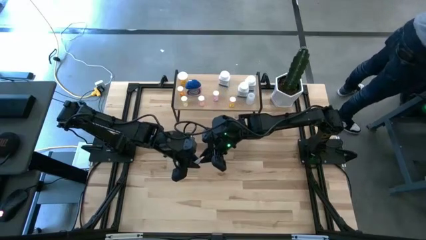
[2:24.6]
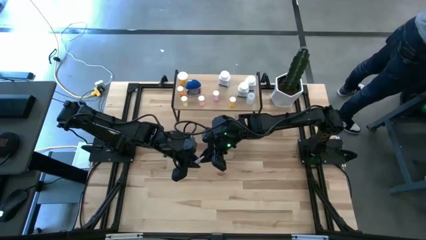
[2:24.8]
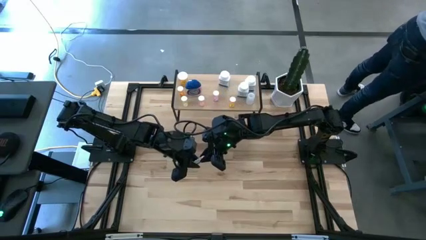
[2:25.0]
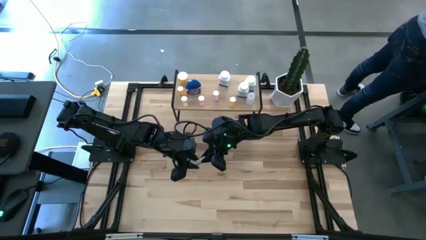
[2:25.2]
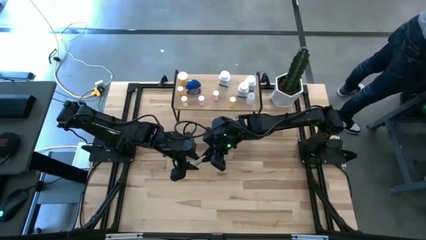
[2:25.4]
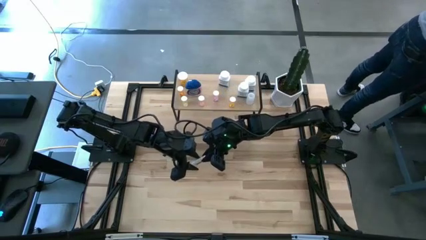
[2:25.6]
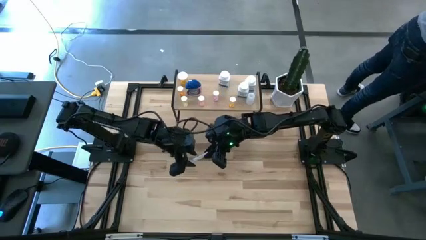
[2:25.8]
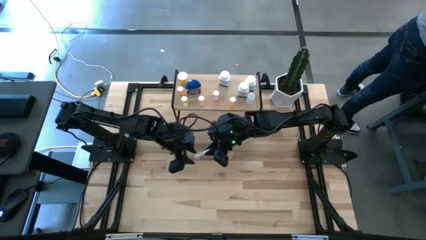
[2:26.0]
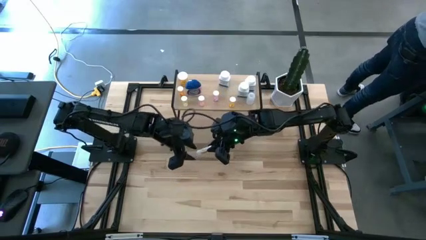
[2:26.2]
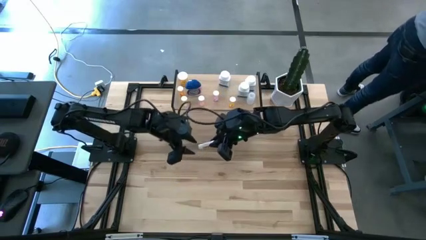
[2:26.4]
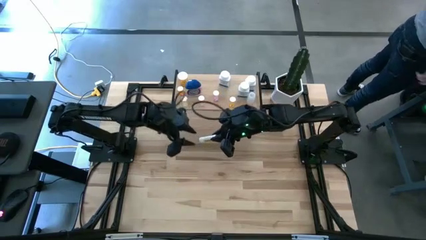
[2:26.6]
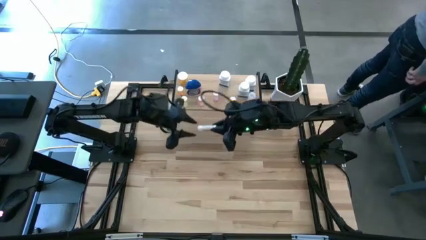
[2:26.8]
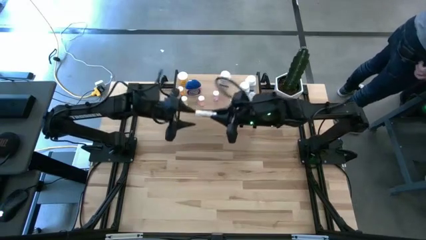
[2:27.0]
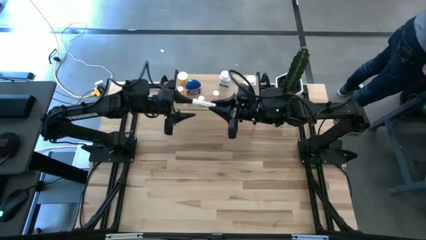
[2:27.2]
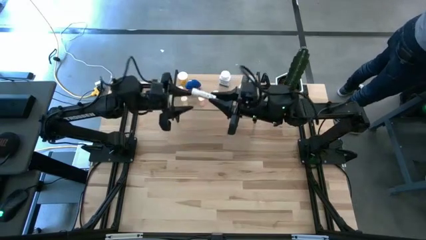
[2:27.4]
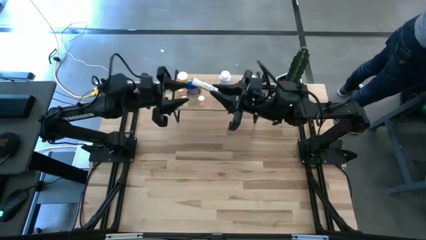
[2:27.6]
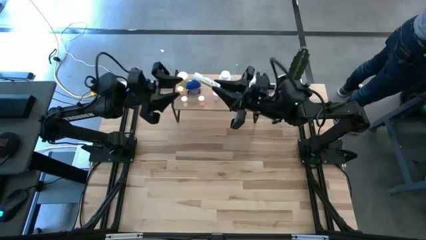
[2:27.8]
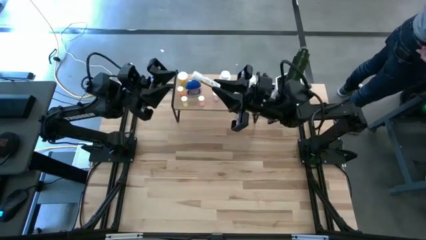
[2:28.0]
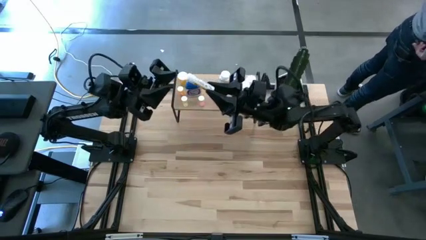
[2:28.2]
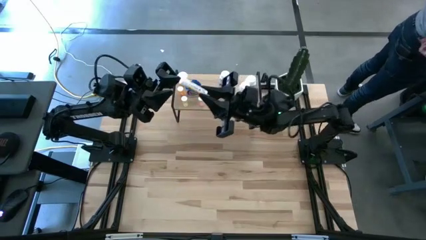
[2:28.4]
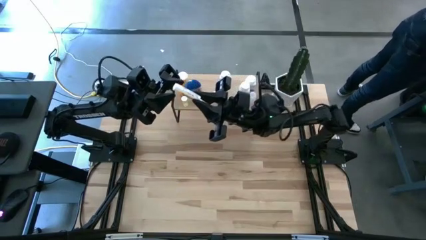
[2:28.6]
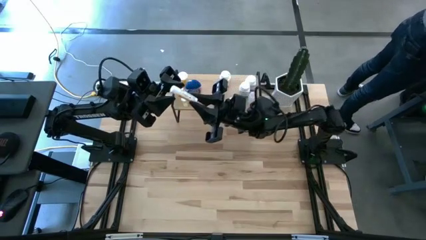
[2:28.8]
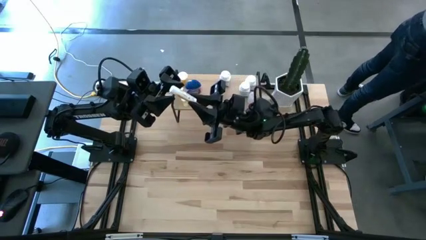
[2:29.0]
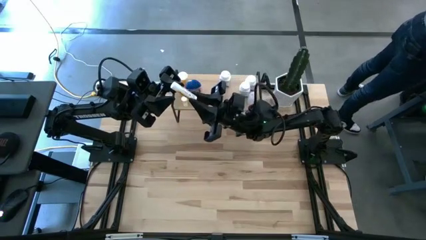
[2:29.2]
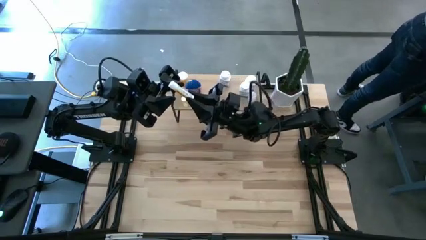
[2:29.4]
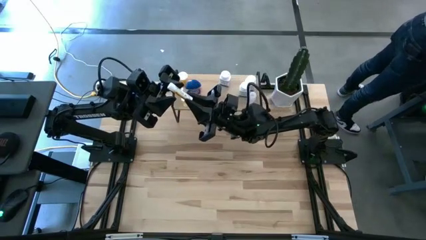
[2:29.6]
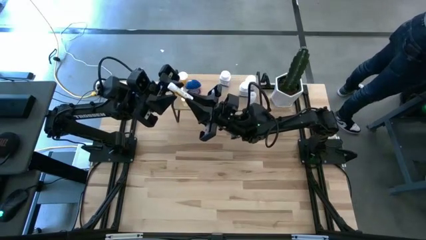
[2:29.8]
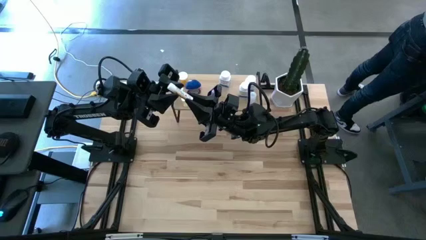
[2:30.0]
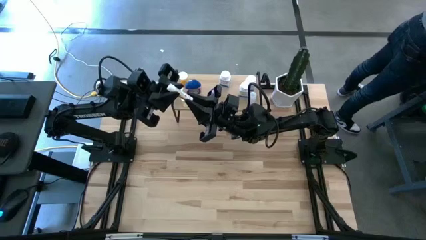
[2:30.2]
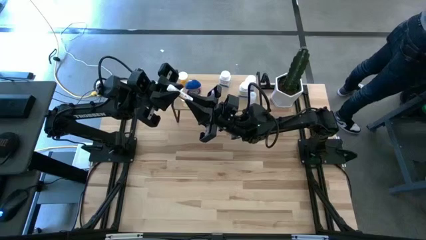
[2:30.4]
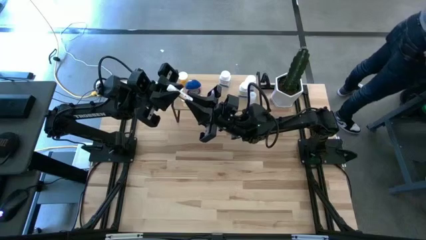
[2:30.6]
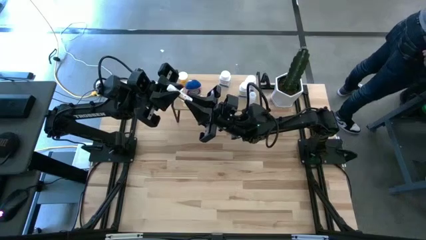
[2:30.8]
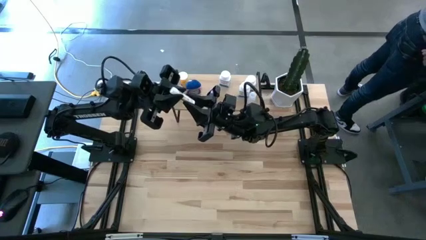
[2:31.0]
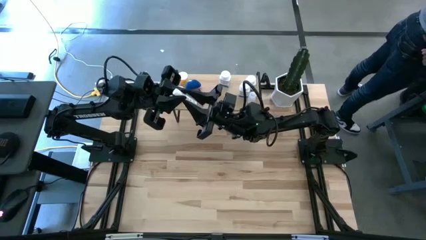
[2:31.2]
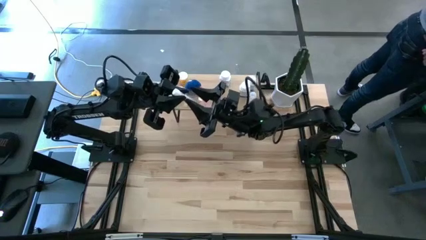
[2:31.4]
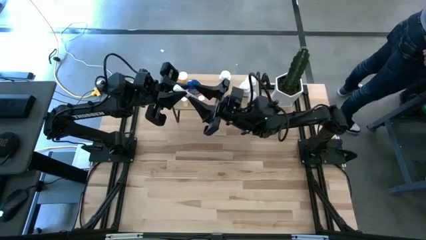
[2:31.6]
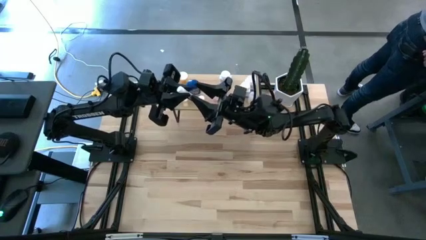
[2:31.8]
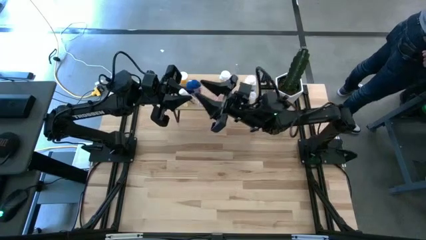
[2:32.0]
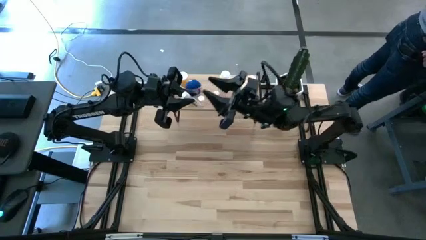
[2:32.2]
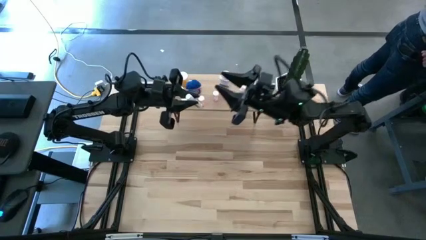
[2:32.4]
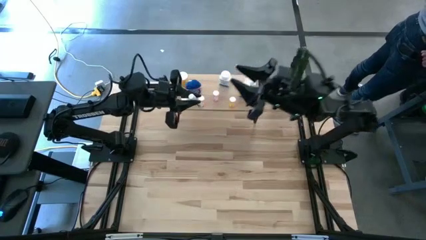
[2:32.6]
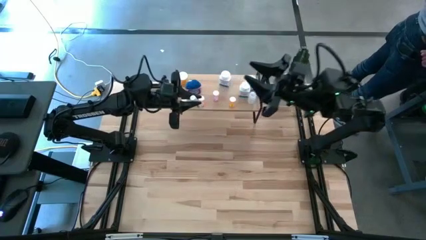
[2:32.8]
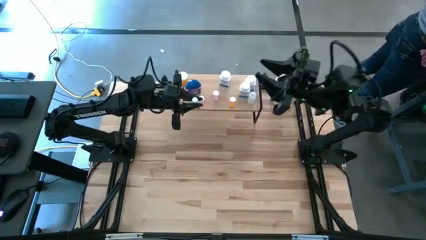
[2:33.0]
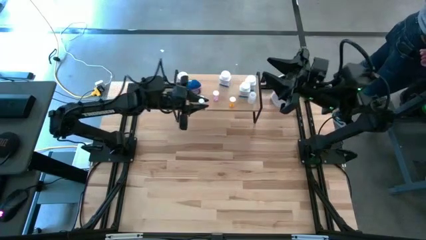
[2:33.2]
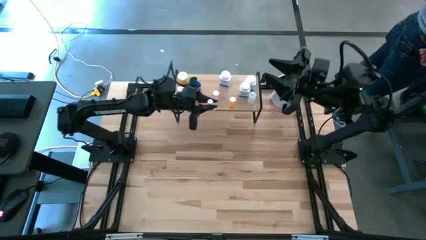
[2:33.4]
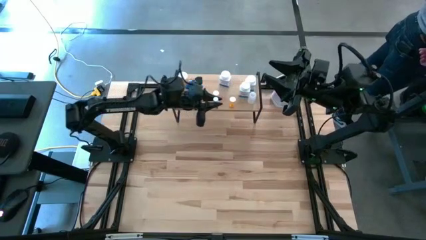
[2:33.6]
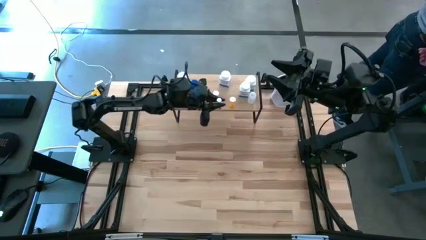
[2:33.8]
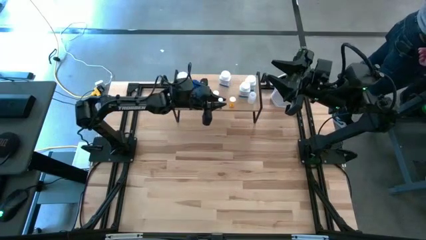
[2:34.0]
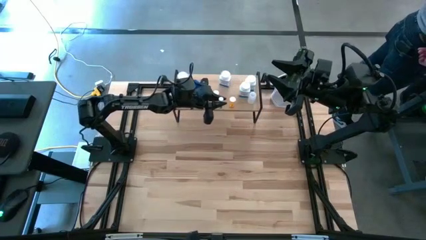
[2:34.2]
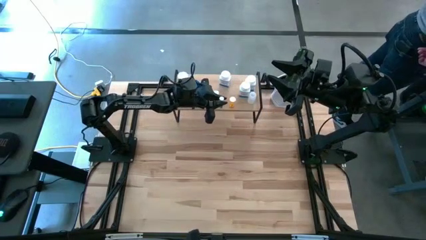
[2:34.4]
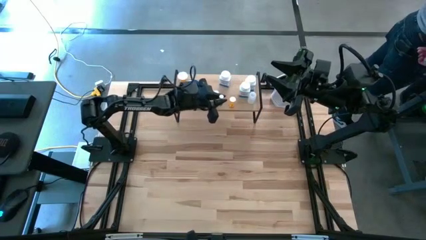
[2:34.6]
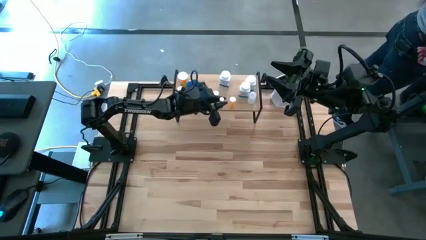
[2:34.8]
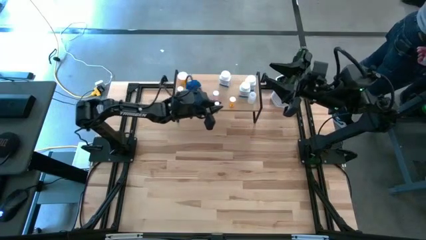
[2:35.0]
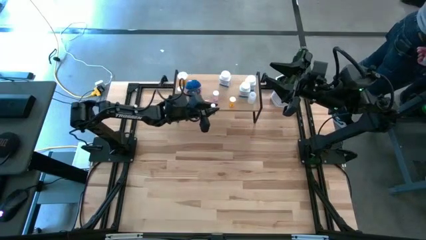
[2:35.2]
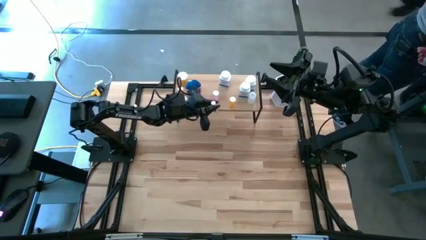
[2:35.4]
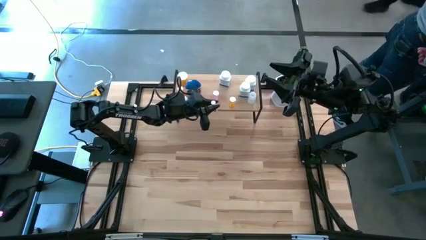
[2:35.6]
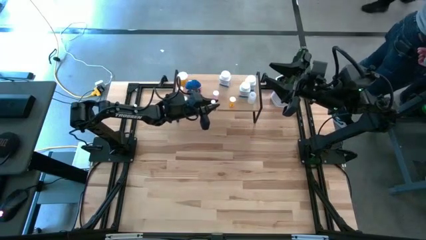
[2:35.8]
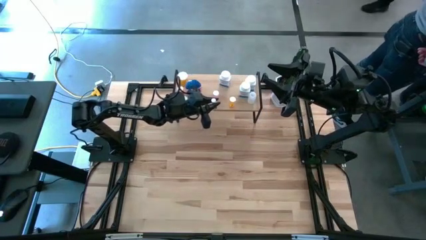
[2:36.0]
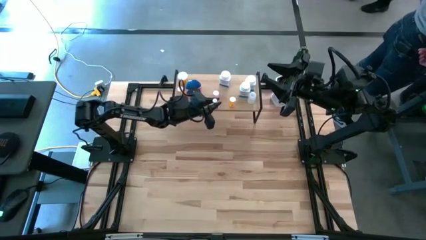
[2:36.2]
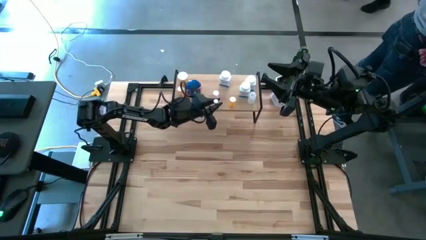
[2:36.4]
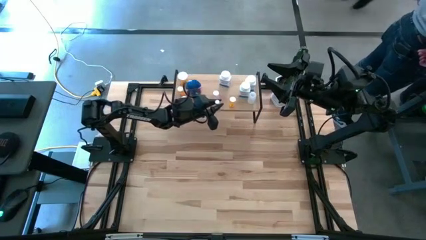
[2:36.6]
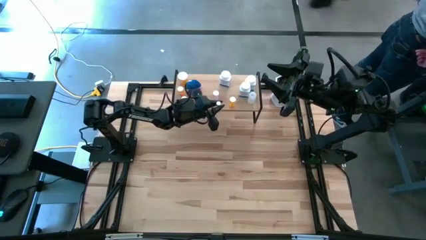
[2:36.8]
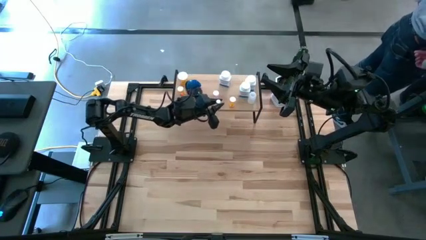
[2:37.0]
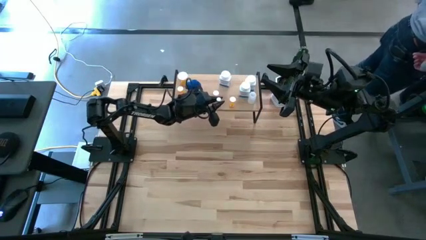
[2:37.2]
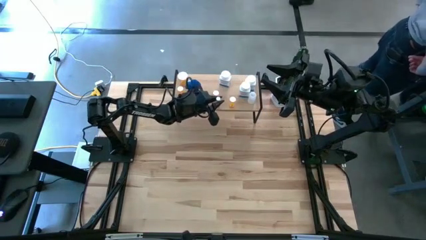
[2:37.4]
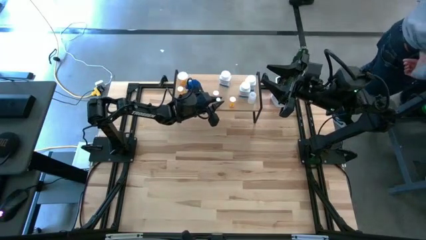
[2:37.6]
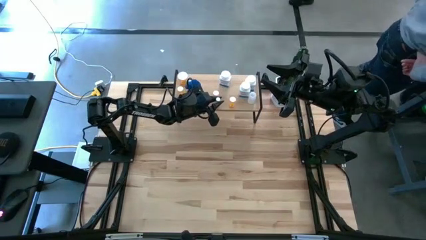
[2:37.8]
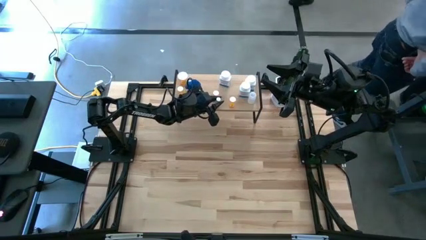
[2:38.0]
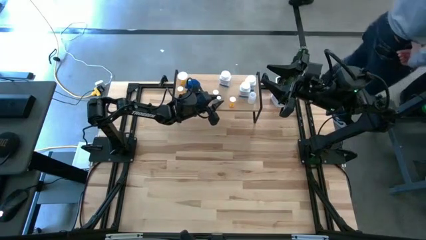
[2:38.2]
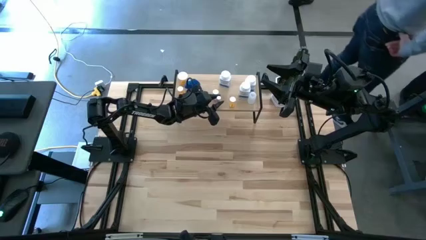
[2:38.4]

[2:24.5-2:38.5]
Task: Pick and place medicine bottles onto shelf by color
Put the white yellow pill bottle on the shelf

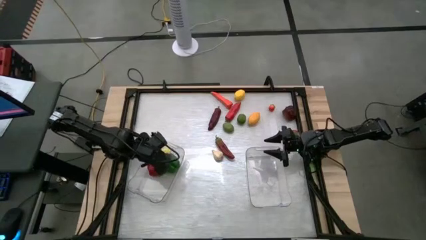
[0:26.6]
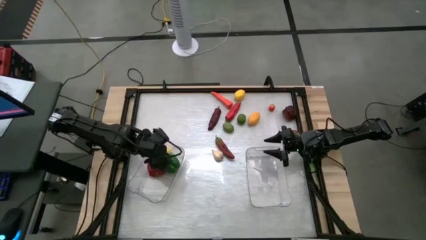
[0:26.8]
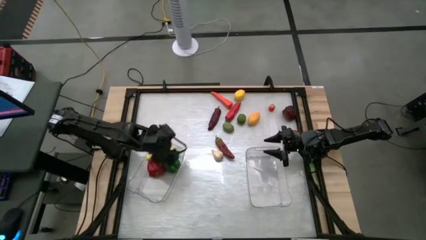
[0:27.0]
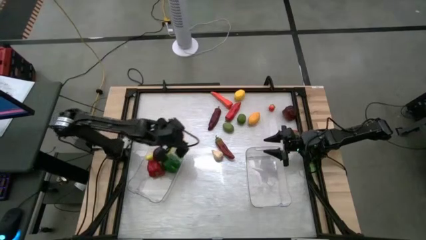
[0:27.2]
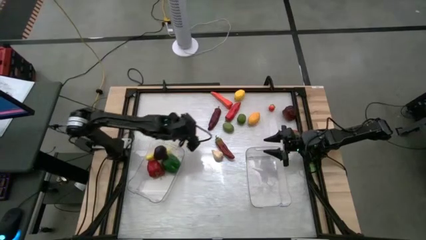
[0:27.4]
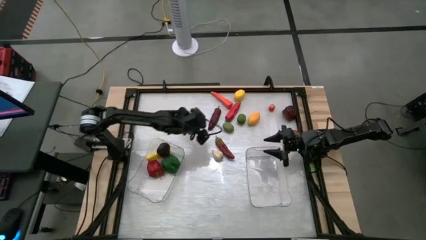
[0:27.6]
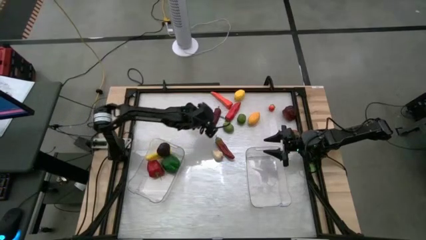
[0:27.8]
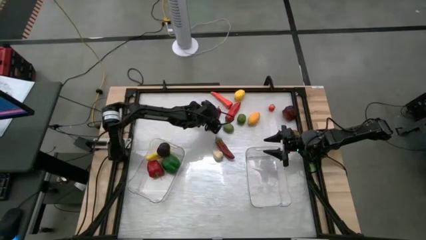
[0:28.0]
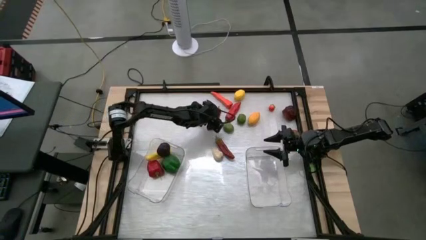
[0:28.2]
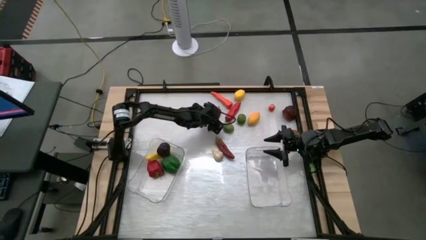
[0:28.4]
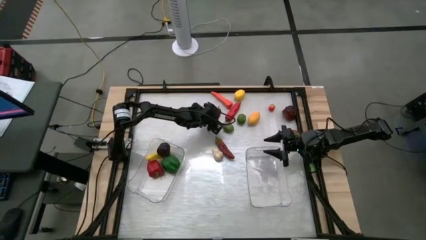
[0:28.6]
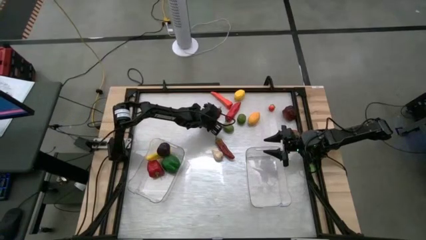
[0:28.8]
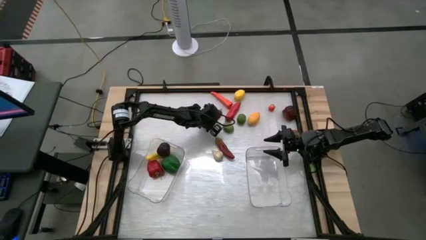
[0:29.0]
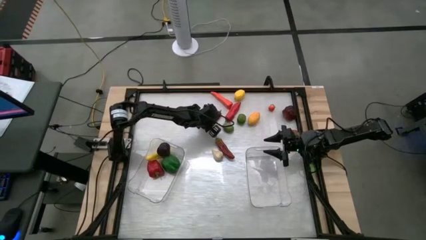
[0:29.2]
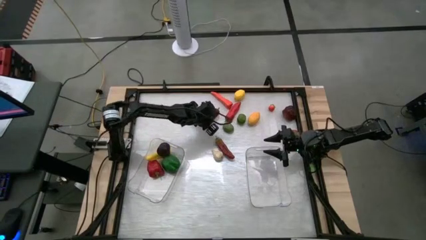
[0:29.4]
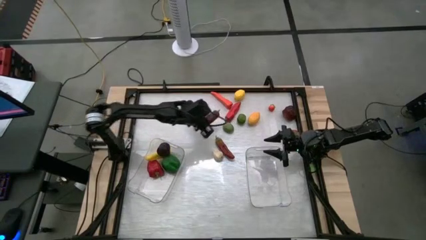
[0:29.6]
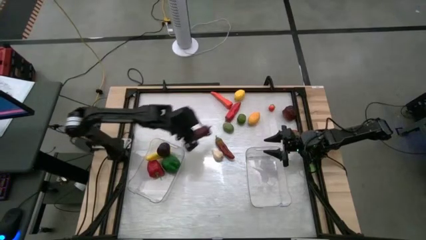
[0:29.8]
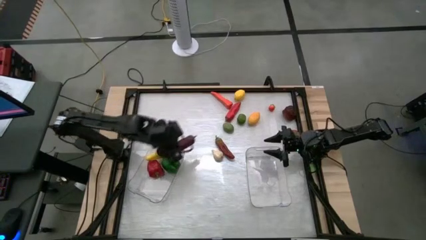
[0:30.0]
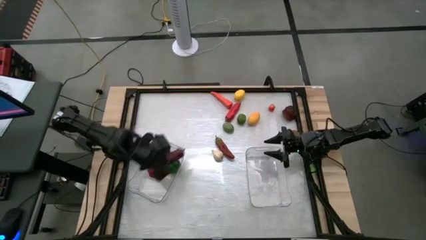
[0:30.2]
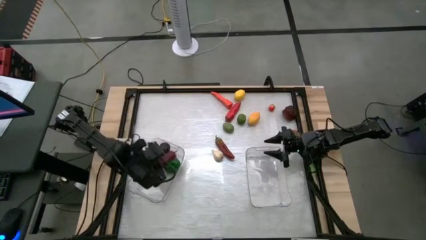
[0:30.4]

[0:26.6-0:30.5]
Task: Sort produce into baskets
Put the top dark red chili pepper into the left transparent bin
